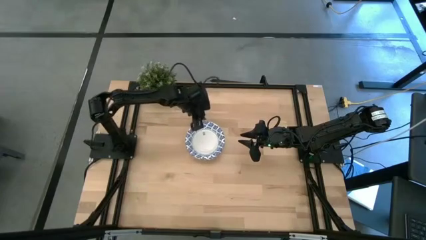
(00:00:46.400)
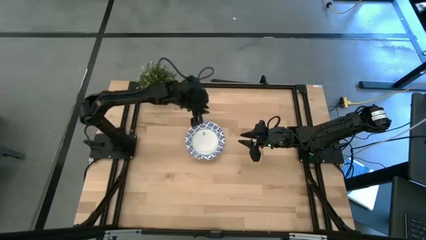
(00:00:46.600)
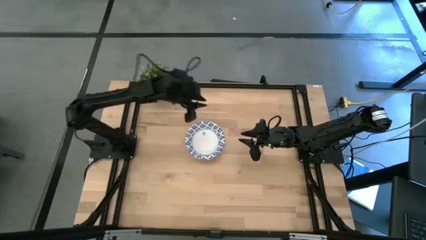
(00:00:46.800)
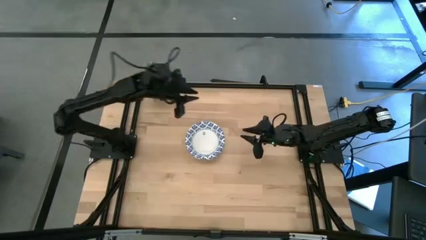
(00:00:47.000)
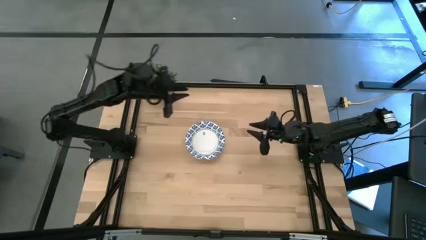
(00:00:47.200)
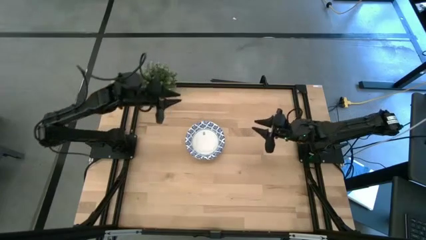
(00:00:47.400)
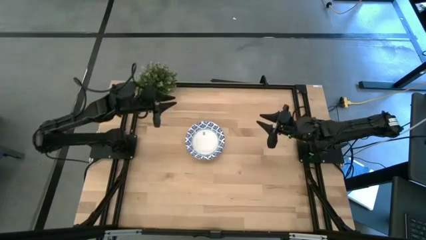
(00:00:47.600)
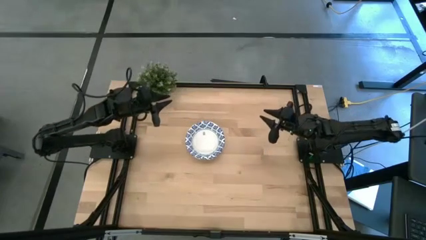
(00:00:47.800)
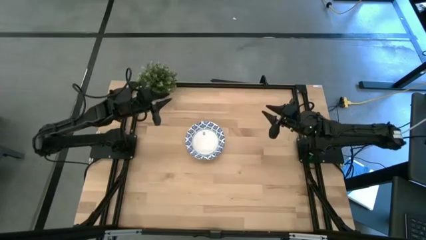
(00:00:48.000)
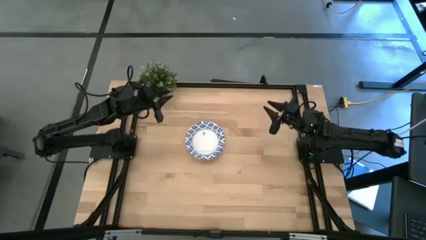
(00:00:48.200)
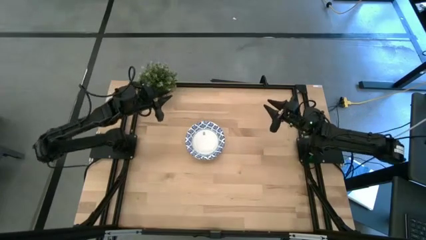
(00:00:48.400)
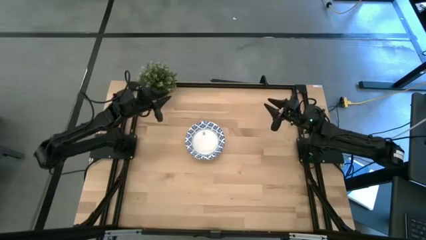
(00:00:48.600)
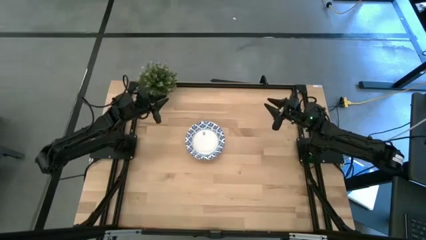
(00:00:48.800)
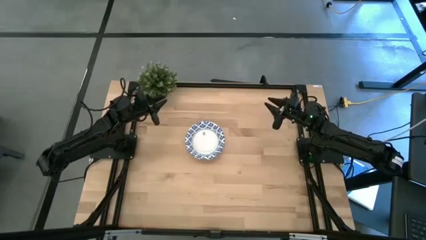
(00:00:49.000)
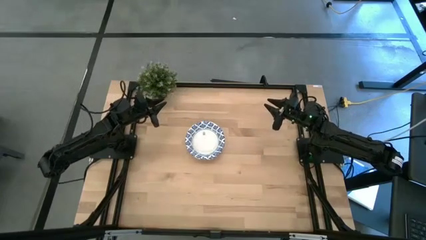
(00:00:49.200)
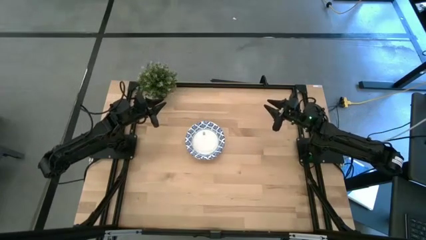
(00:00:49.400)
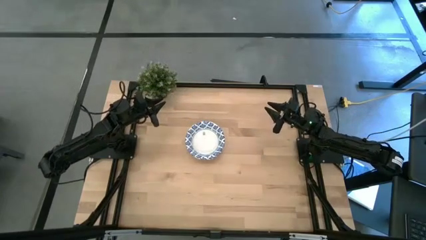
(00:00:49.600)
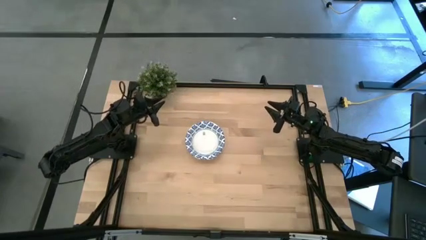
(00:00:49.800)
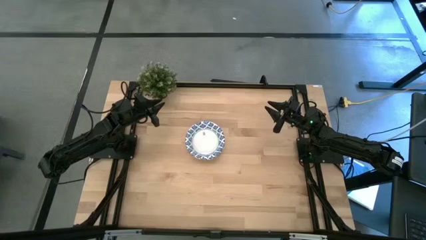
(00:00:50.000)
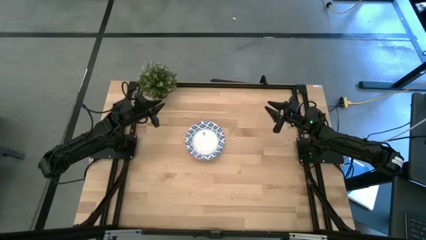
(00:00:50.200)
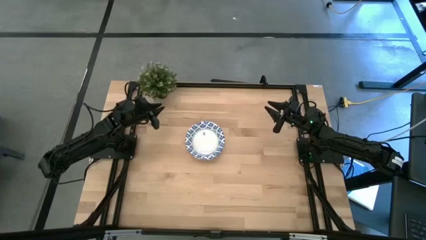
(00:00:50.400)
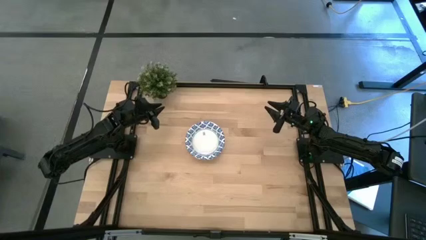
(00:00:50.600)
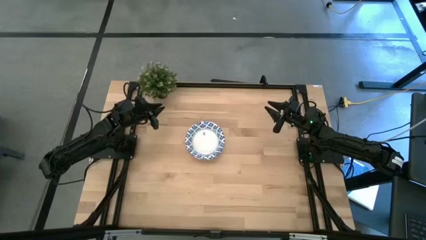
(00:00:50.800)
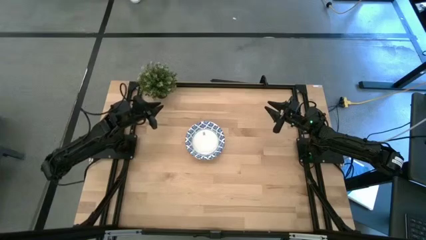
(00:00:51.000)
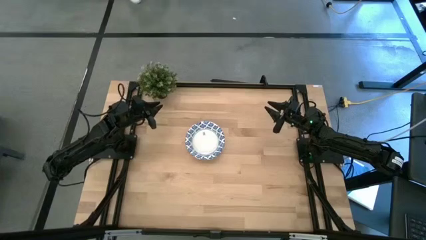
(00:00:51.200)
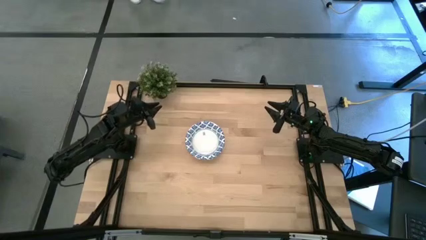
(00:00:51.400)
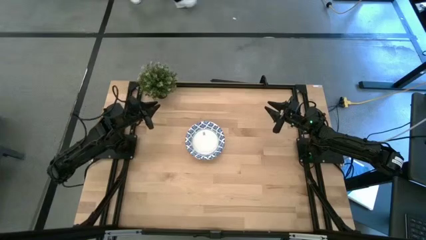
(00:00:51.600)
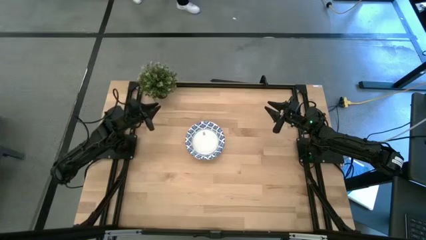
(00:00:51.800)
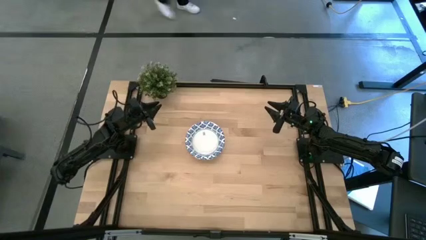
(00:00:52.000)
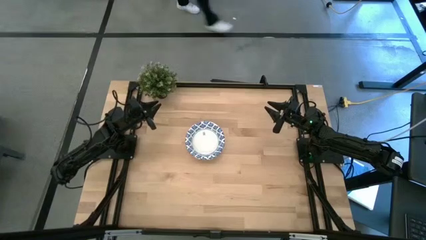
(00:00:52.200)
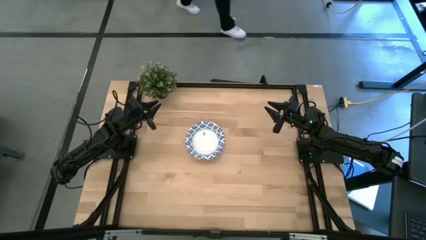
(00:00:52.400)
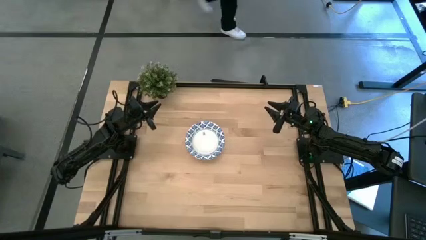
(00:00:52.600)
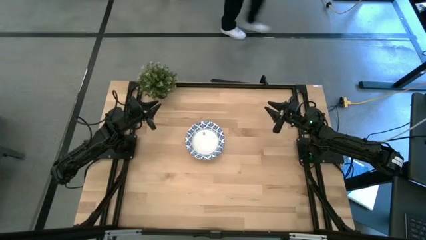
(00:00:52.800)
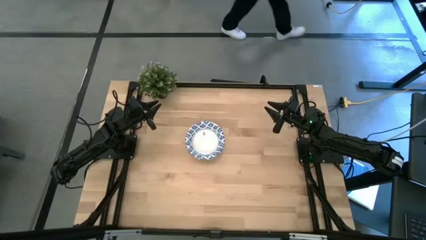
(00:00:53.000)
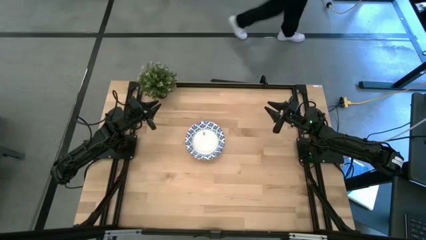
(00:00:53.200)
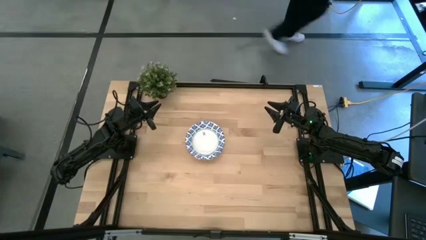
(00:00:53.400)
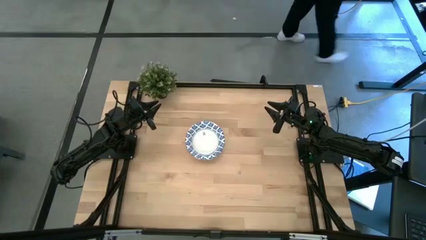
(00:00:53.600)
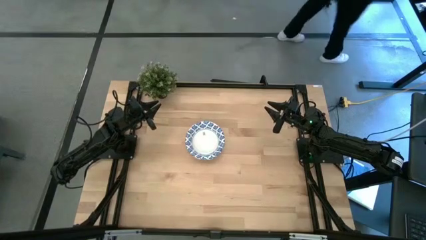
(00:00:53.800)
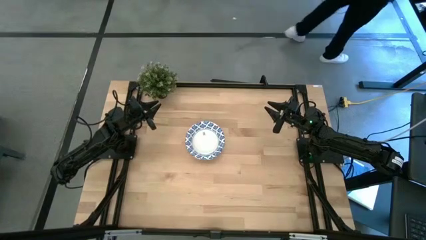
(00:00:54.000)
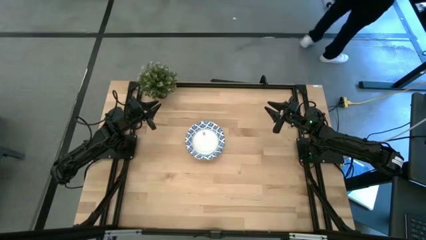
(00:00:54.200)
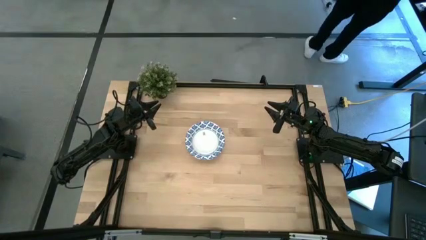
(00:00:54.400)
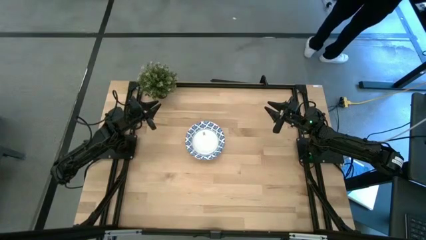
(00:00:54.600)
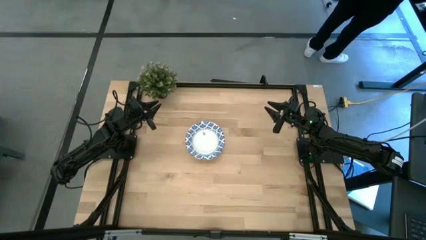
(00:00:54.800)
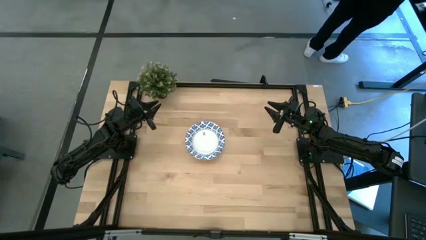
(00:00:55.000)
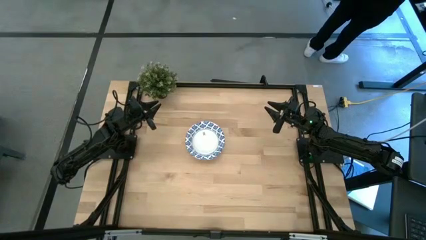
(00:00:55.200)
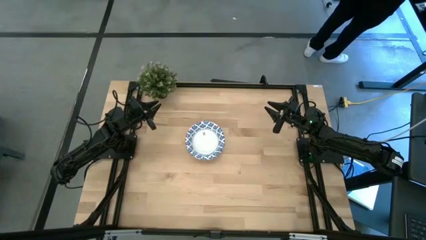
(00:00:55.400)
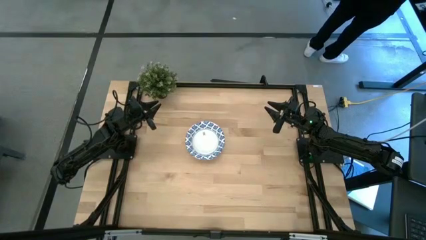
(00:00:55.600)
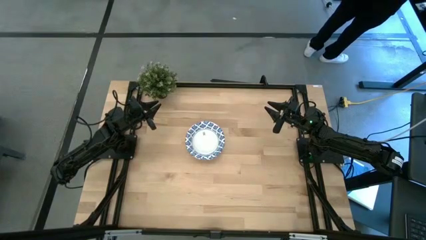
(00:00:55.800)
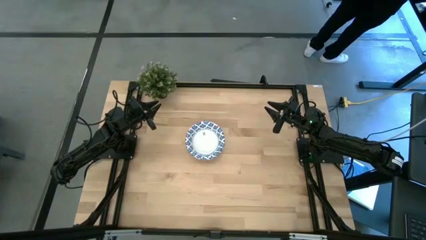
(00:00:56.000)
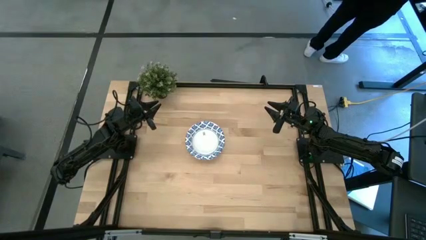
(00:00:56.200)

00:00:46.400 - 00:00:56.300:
Task: Nest bowls inside each other
Return to Home Position

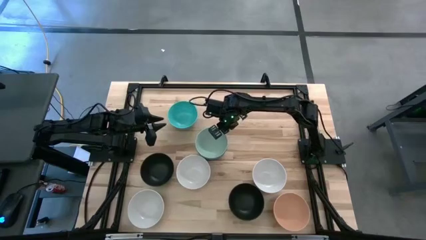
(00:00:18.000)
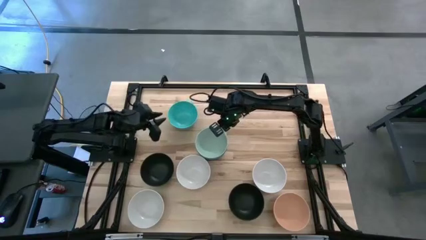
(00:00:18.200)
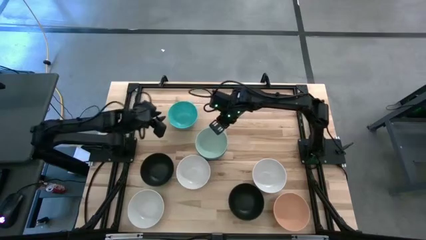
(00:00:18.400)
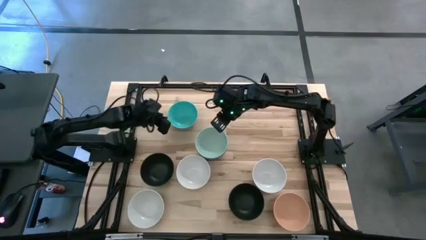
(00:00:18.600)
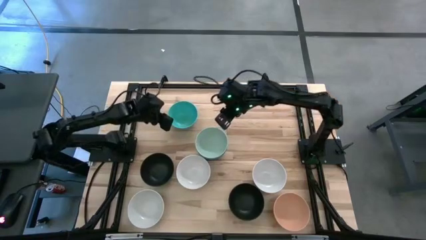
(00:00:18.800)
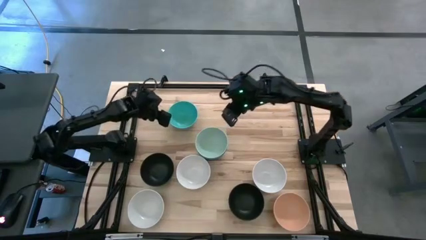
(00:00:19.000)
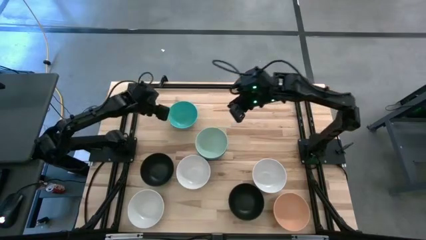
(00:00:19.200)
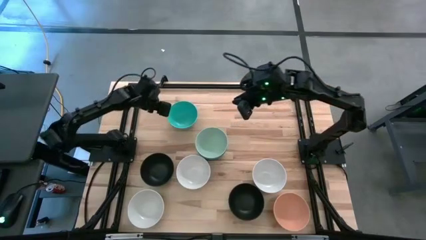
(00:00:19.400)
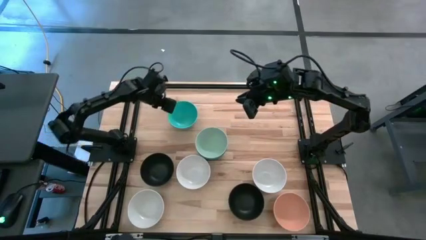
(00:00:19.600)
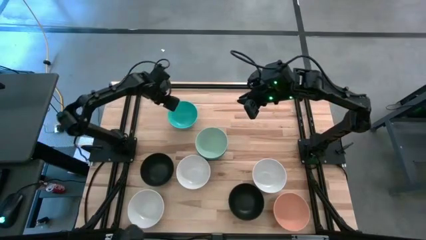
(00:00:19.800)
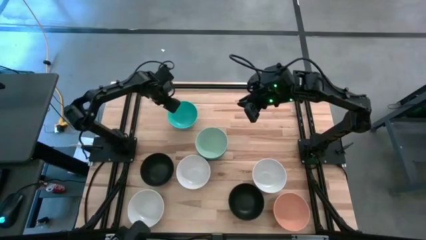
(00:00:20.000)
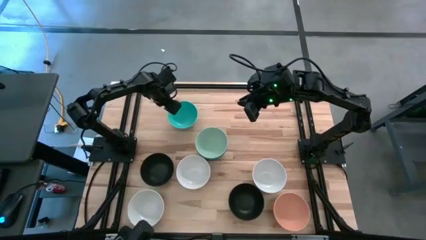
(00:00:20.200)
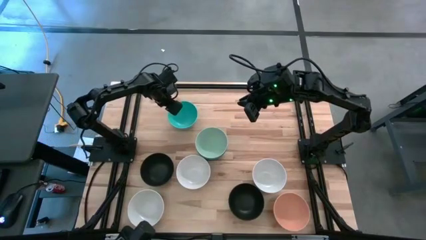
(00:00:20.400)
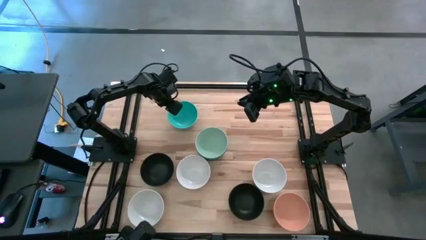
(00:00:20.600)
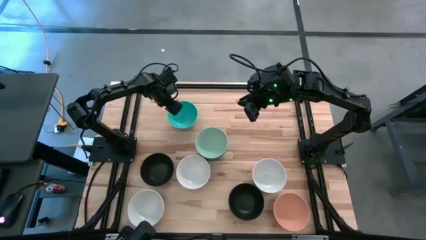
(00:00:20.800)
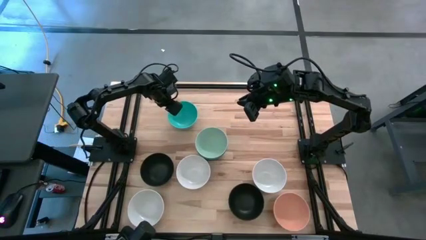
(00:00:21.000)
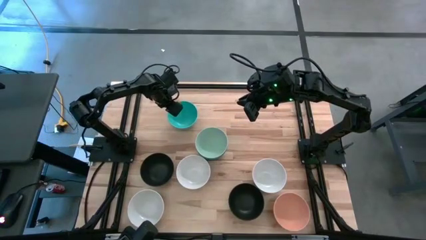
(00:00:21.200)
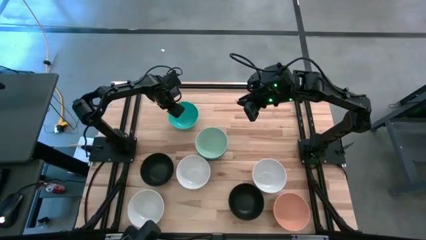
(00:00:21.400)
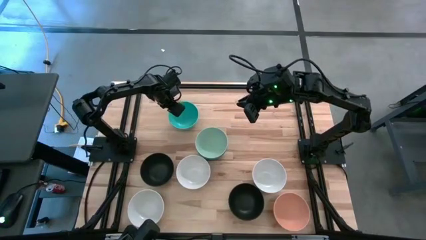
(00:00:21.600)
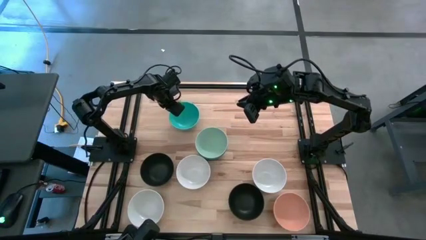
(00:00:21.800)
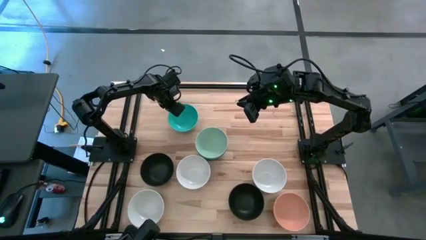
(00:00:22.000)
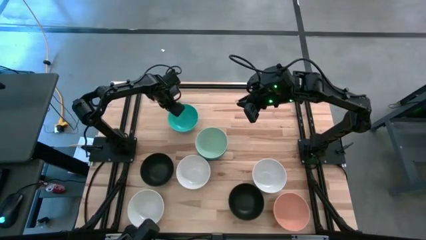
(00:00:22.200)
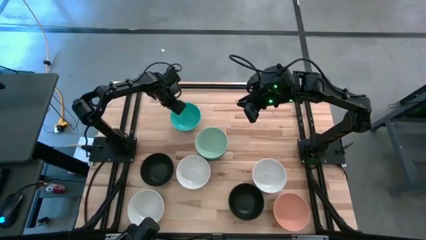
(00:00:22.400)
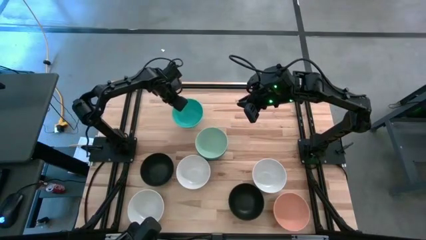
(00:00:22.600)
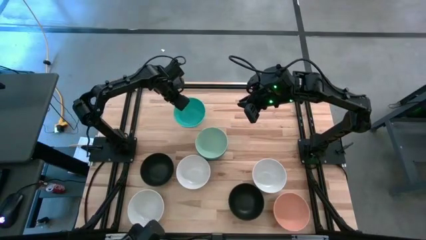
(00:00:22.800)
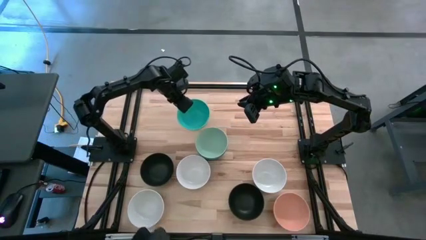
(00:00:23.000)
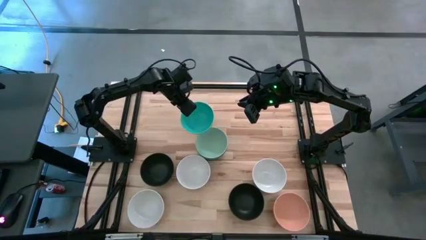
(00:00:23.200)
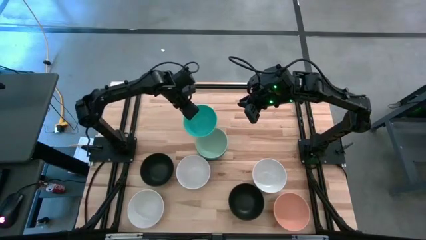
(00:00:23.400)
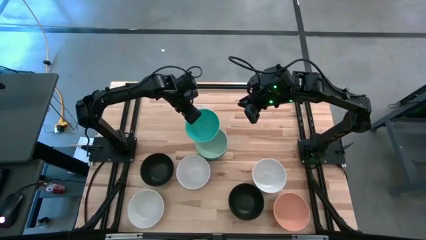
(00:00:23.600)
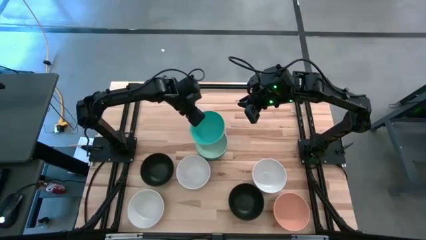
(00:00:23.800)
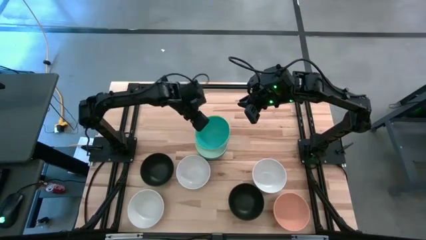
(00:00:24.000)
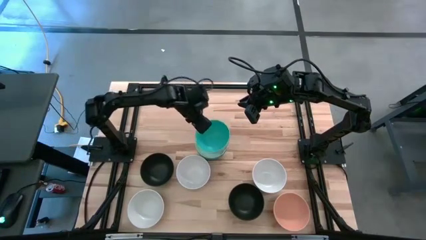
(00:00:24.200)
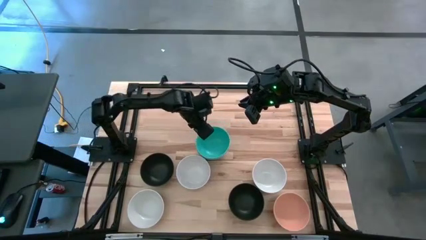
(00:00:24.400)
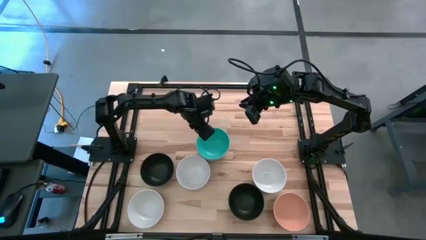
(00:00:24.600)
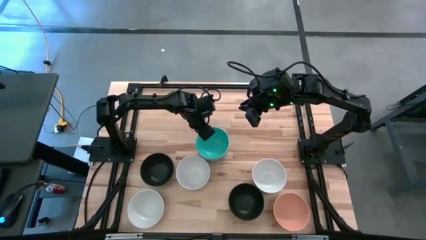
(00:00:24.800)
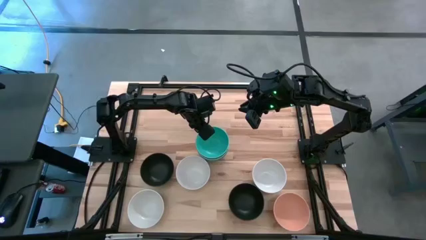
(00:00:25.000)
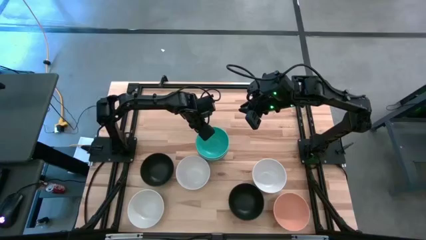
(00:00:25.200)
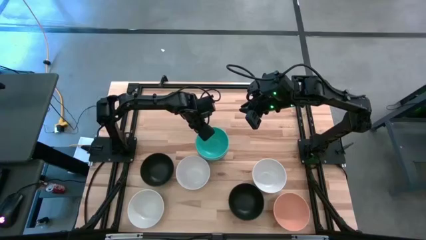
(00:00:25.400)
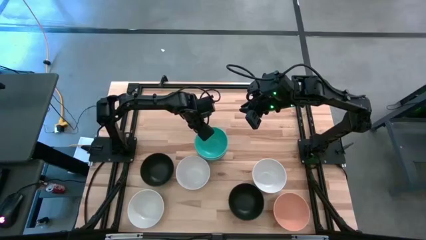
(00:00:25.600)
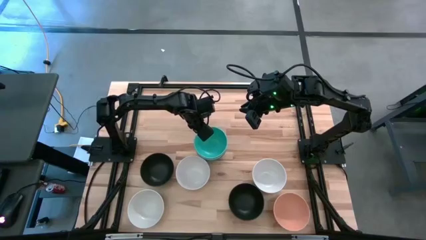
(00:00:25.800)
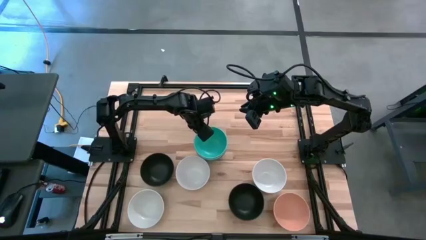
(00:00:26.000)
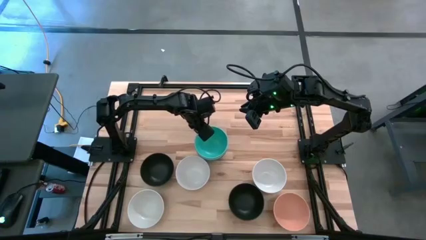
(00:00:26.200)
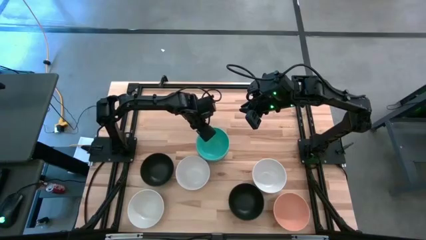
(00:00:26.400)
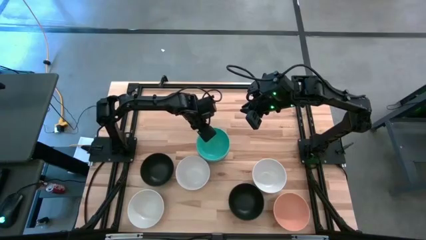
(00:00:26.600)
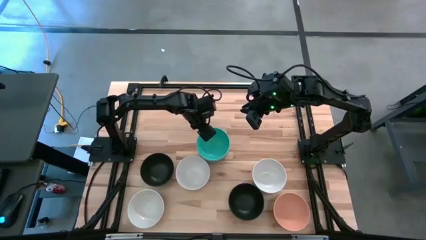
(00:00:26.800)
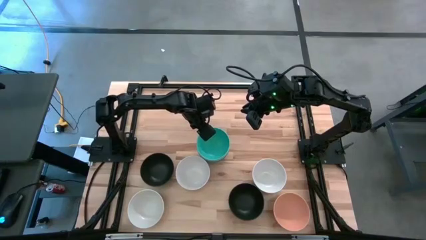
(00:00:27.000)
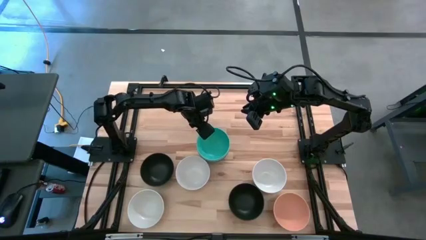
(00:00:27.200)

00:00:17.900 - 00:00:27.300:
Task: Nest bowls inside each other
Stack the blue bowl on the light green bowl
